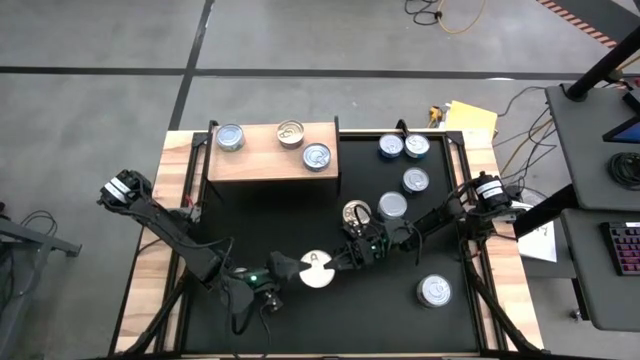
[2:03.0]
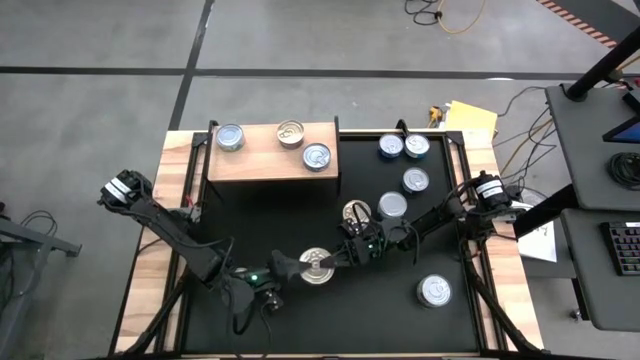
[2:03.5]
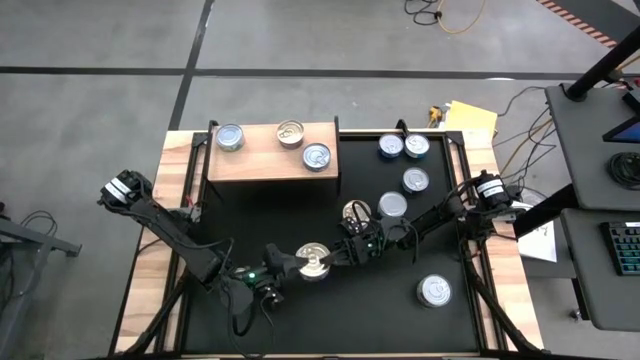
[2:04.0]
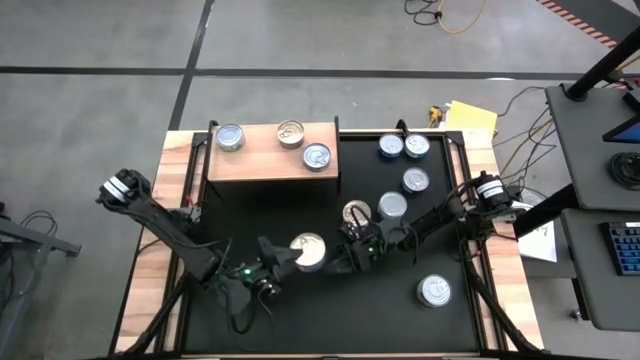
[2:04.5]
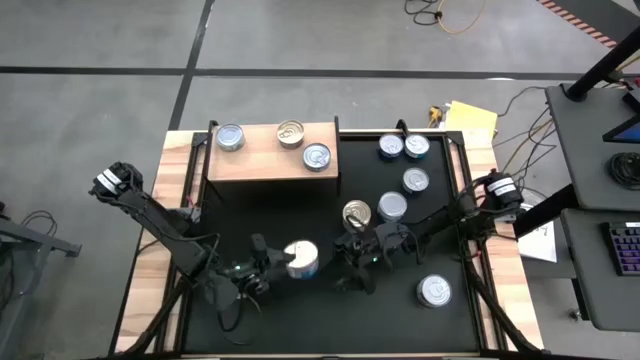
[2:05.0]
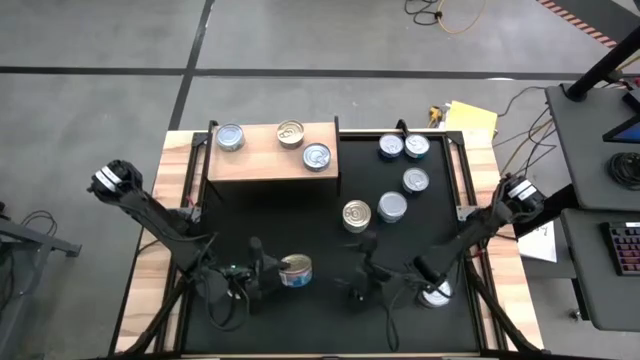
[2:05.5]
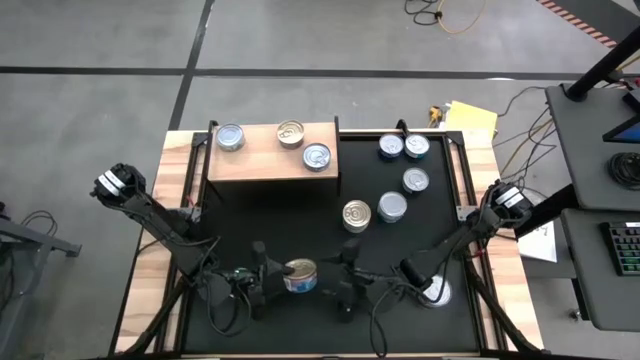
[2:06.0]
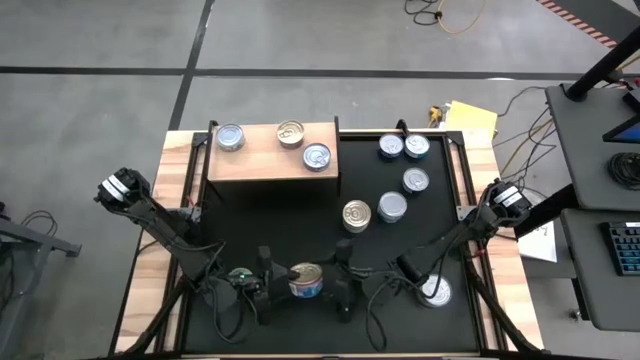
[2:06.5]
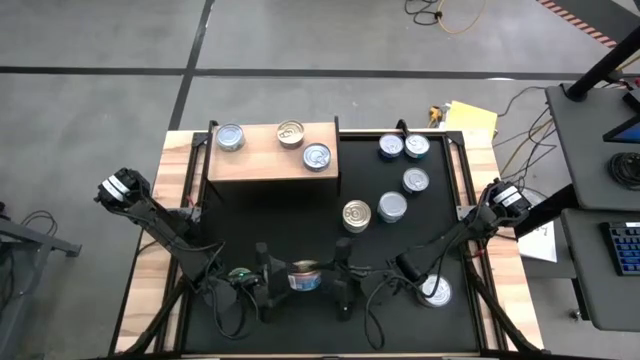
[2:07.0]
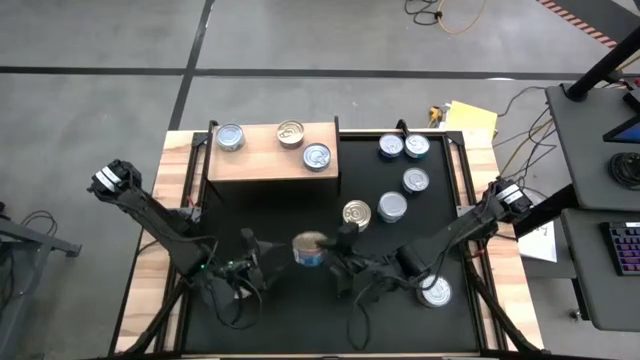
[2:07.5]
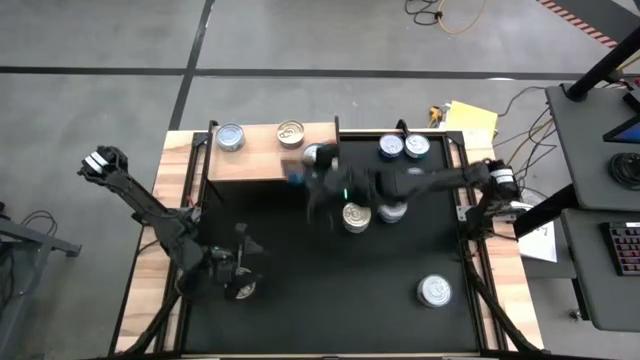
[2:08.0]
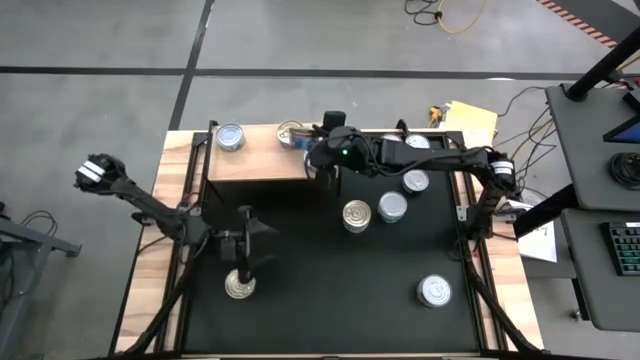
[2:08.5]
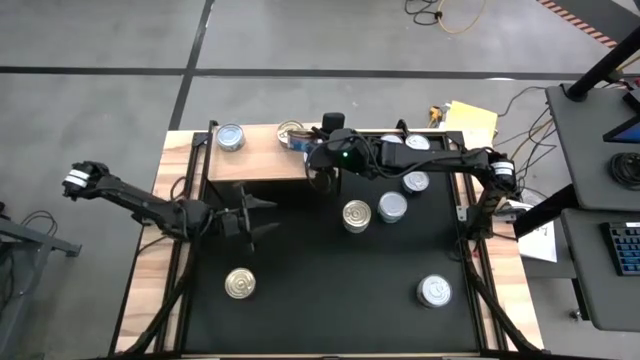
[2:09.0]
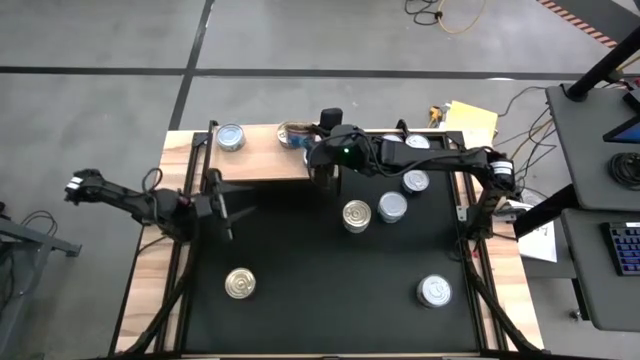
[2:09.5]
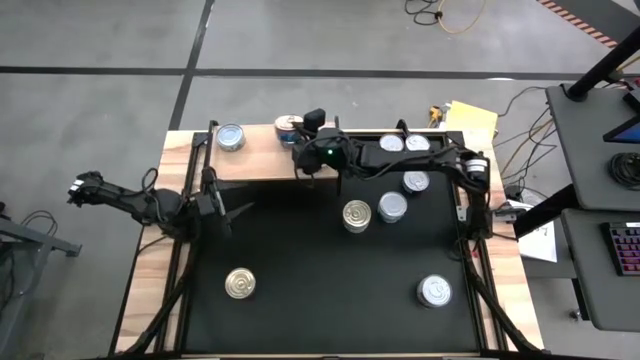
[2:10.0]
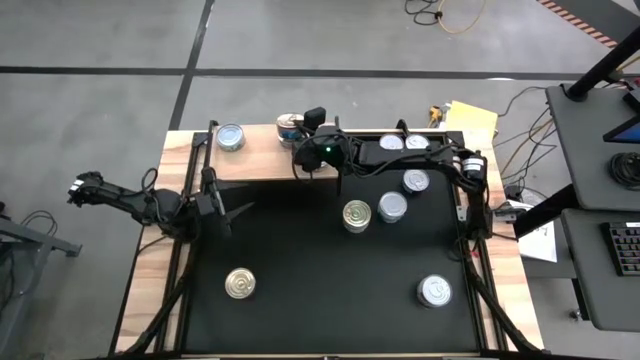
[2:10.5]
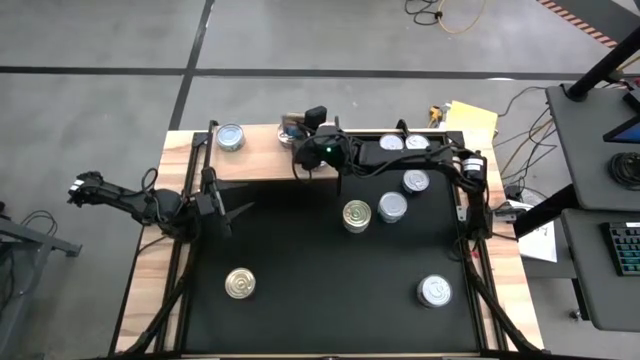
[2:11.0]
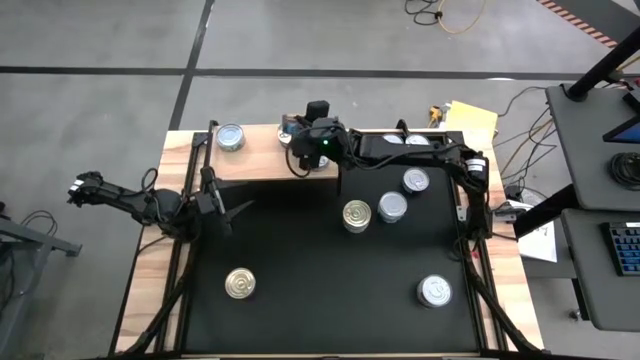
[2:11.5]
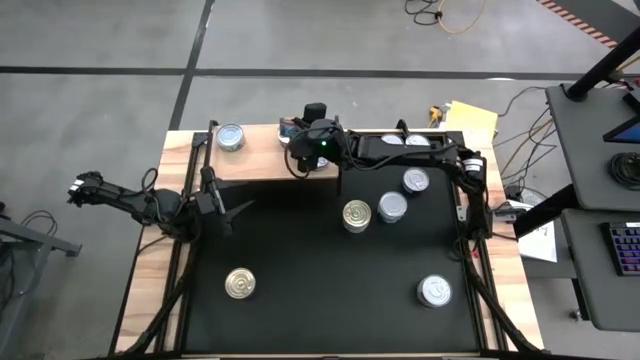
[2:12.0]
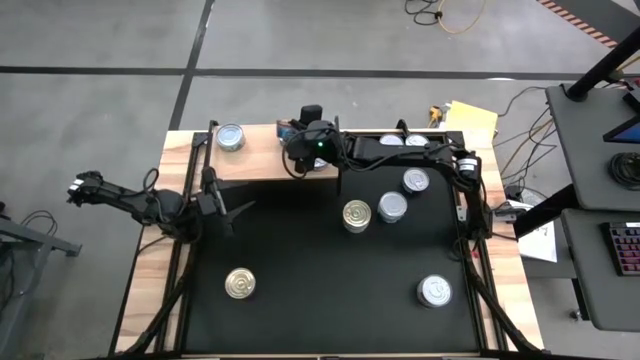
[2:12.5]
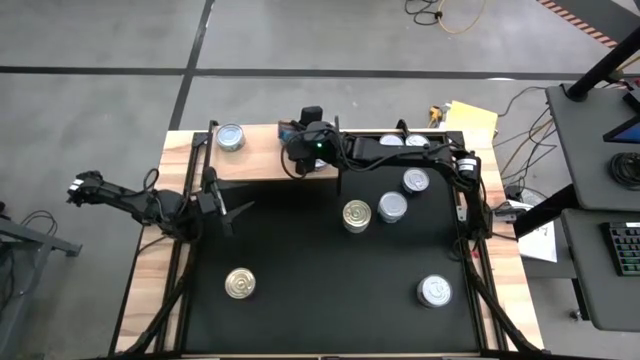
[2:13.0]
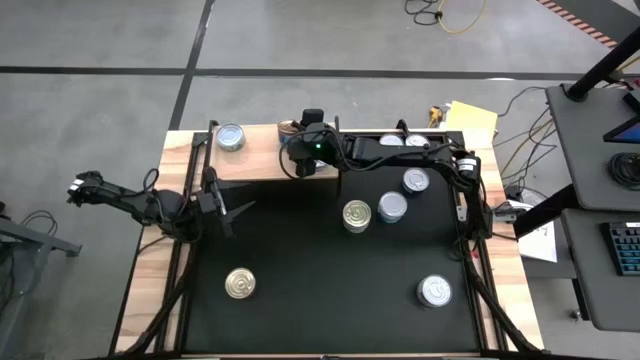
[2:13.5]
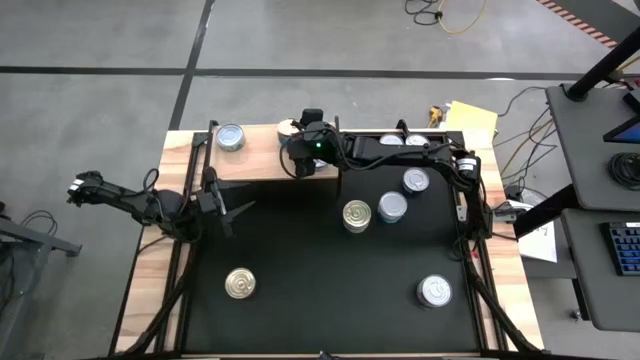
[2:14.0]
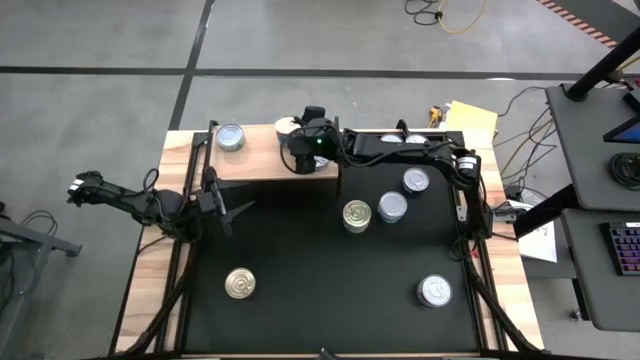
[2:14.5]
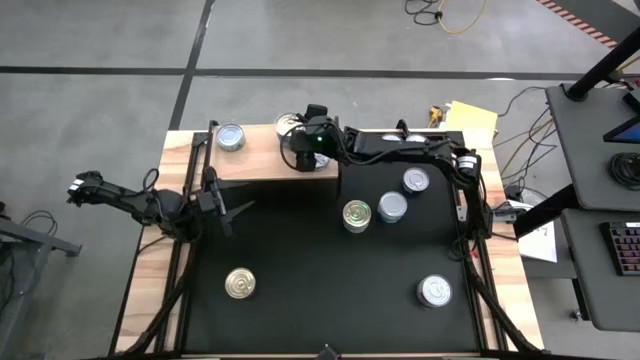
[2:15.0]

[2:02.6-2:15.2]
Task: Stack canned seafood by type on shelf
Stack the blue/pink tuna can on top of the other blue/pink tuna can on the shelf

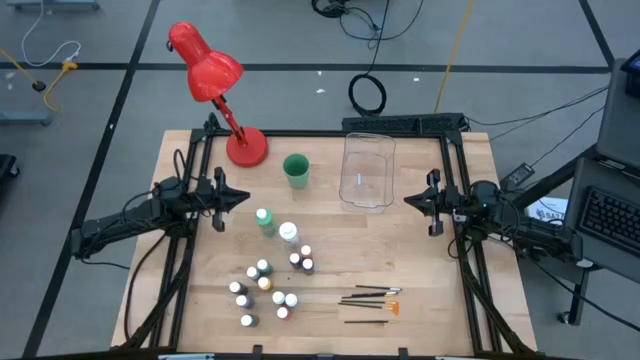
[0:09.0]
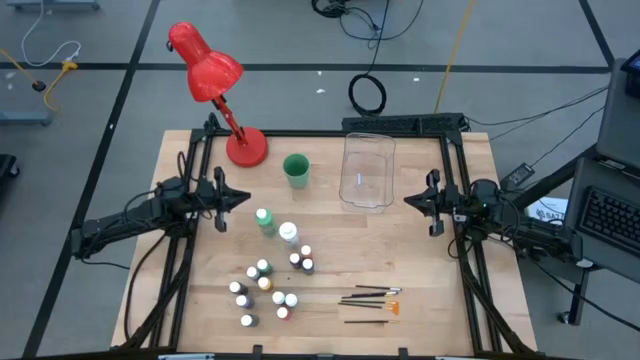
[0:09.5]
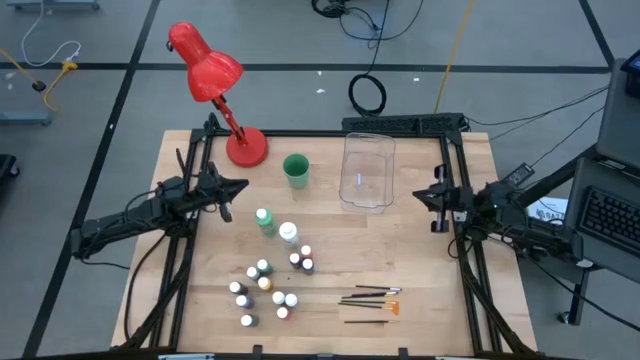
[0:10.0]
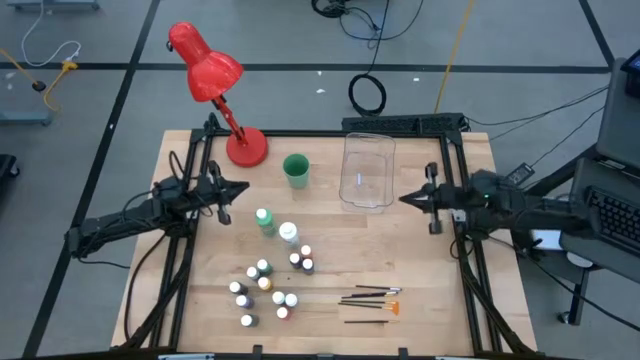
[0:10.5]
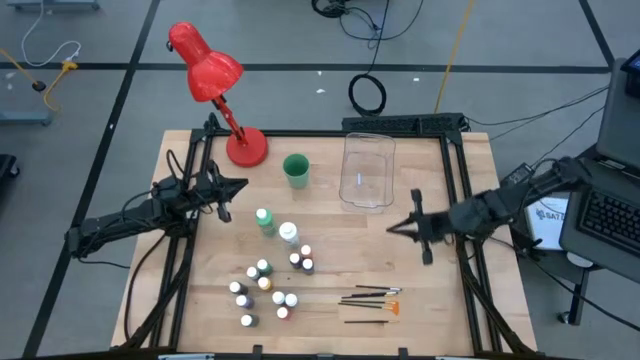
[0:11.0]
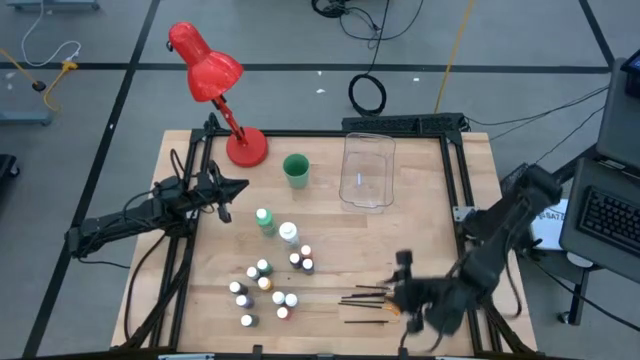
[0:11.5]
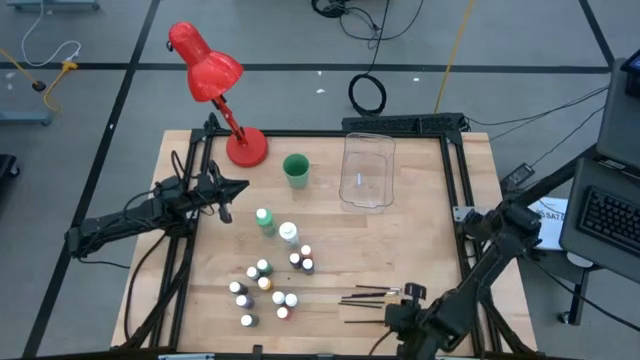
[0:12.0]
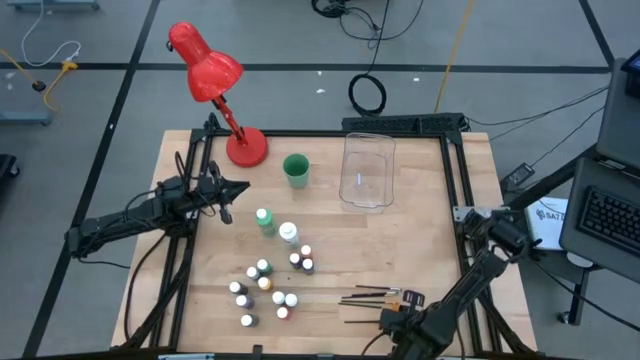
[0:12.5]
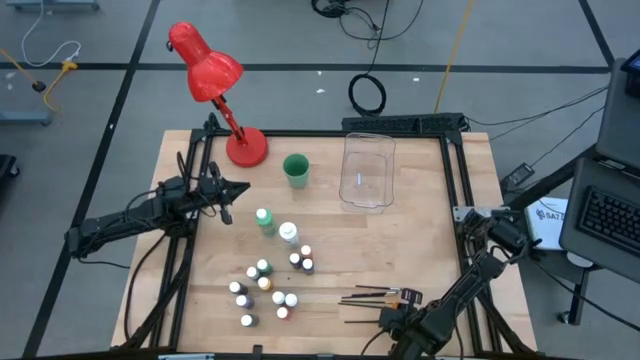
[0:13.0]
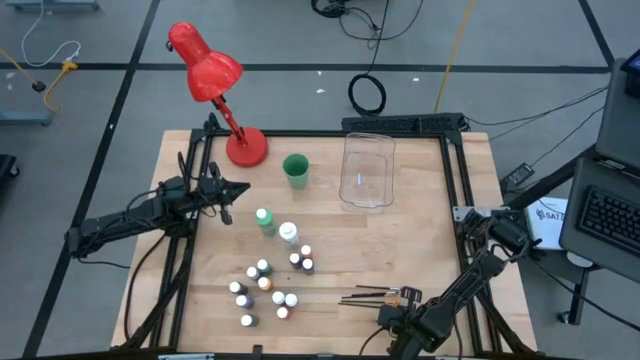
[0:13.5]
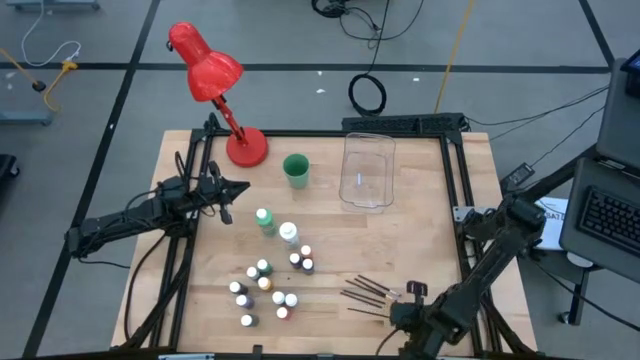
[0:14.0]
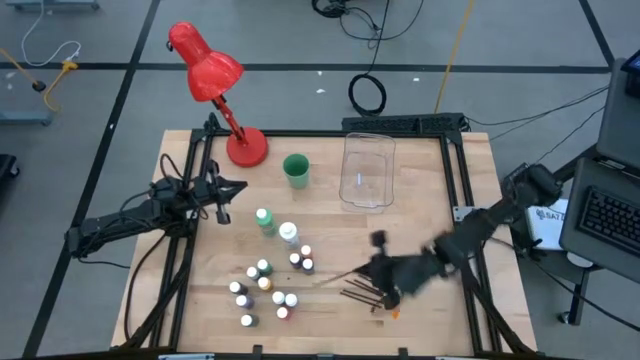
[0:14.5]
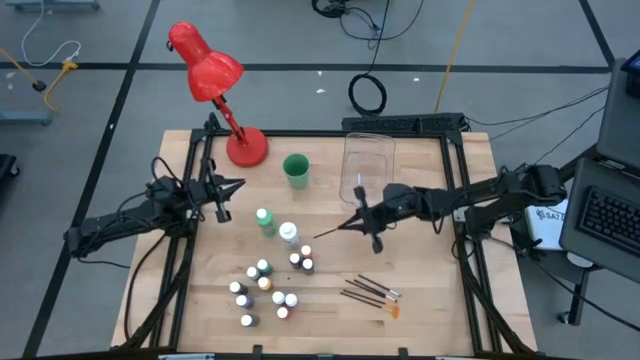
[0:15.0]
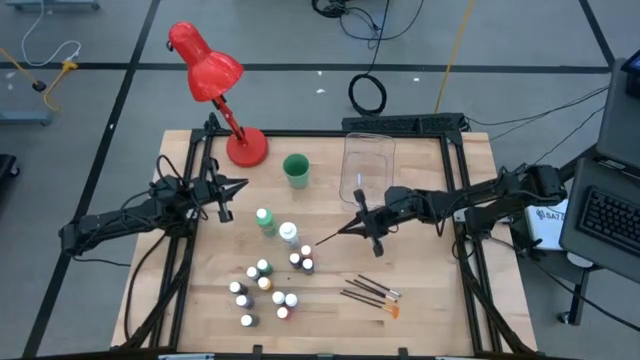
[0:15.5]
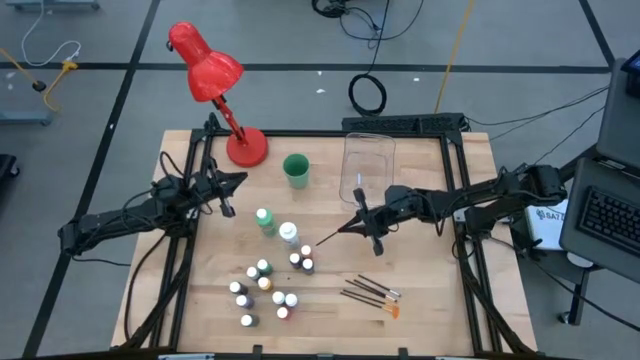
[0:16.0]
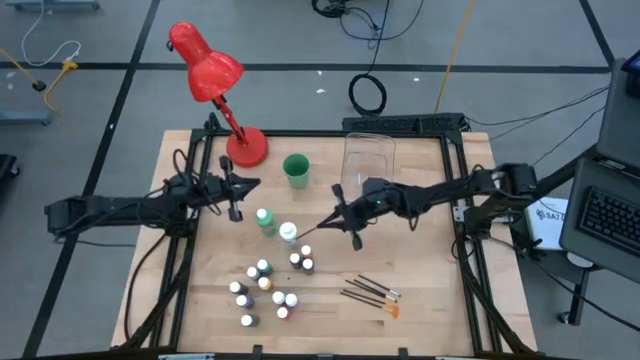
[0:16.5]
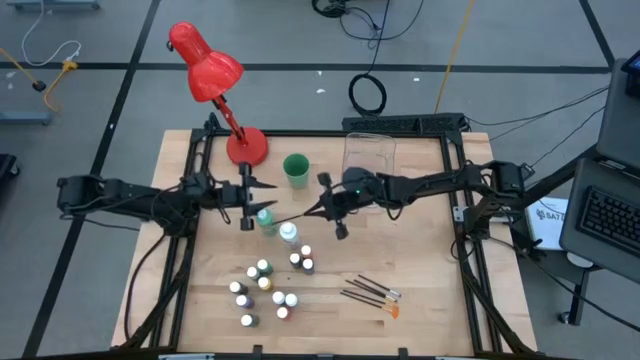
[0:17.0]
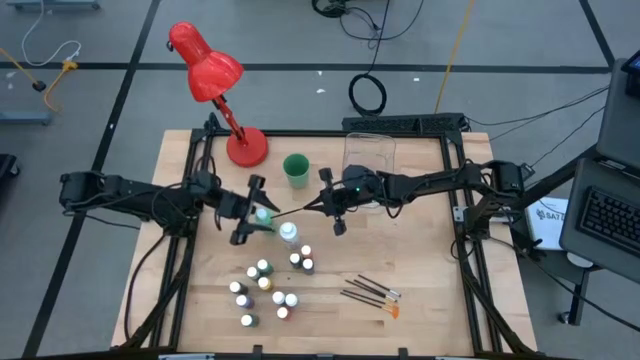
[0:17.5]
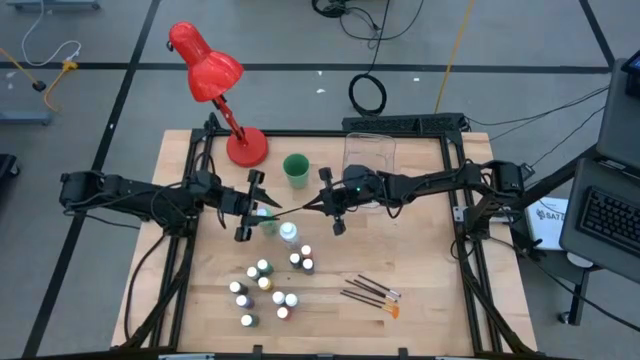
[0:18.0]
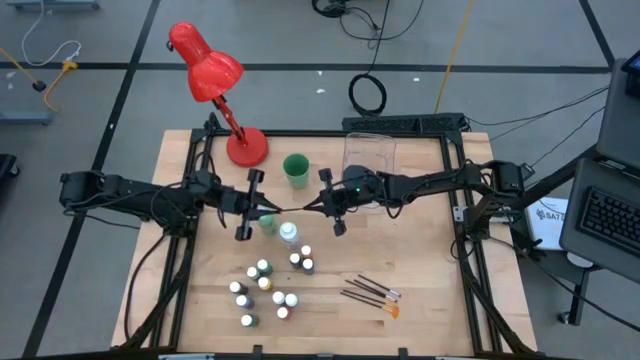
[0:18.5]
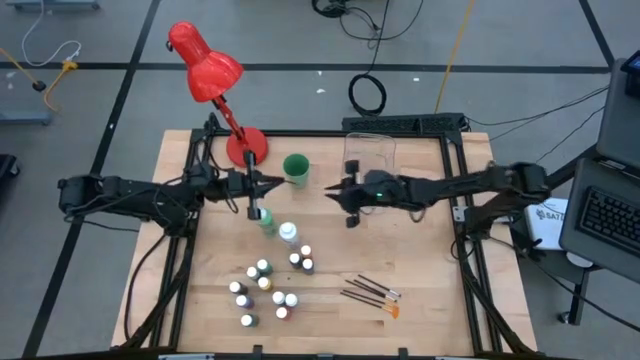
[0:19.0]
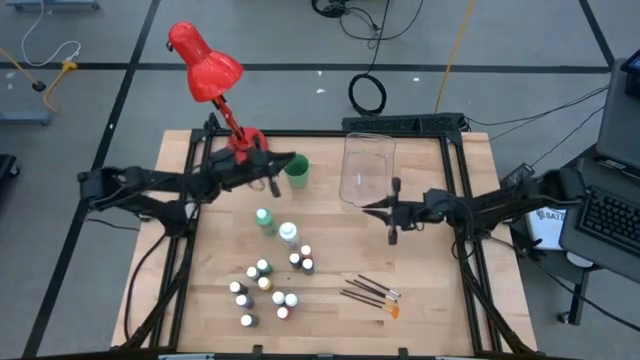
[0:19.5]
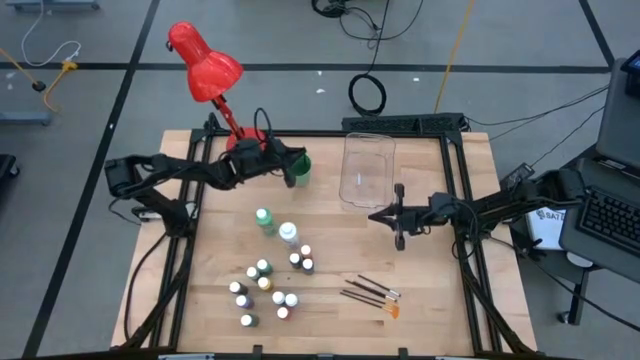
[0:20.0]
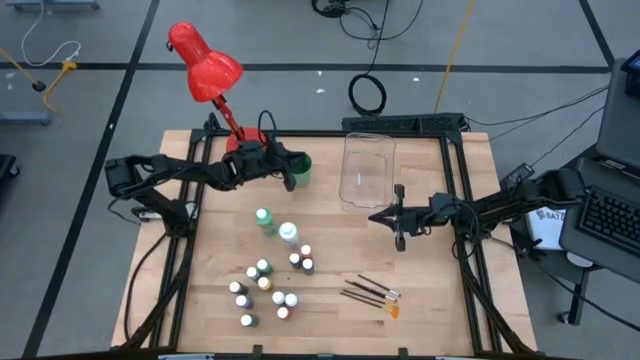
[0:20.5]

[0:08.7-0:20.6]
Task: Pick & Place Paint Supplies
Put the gold paintbrush into the green cup
